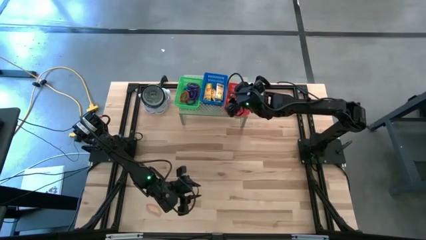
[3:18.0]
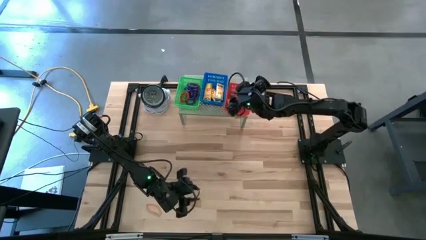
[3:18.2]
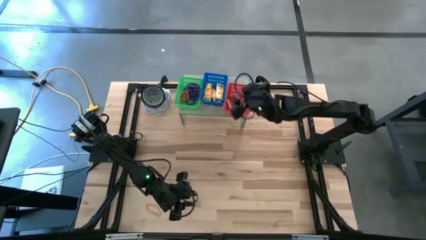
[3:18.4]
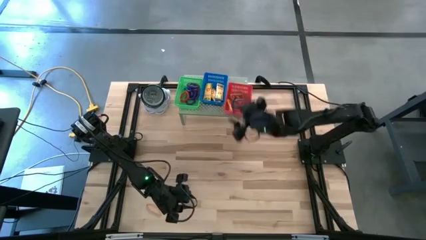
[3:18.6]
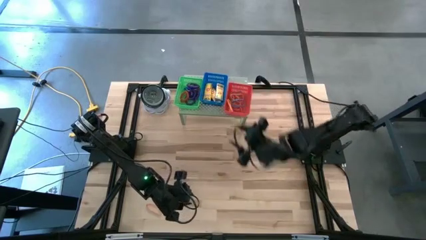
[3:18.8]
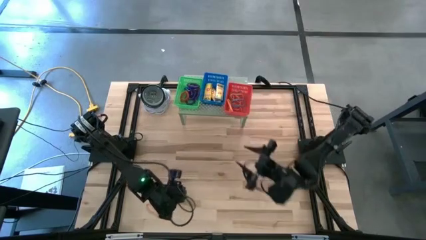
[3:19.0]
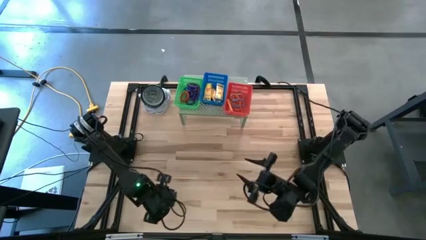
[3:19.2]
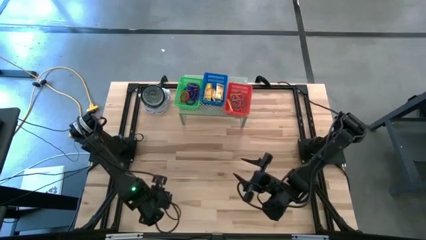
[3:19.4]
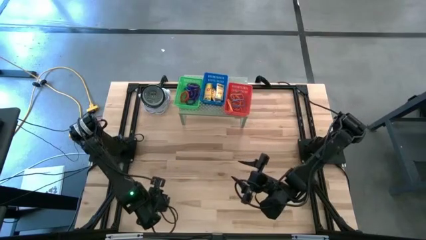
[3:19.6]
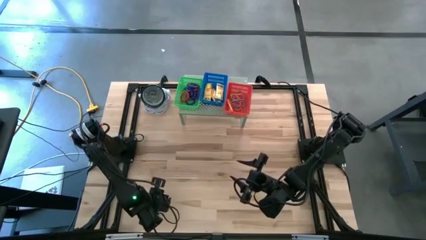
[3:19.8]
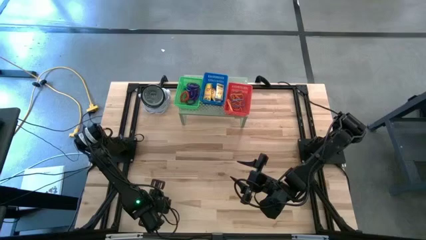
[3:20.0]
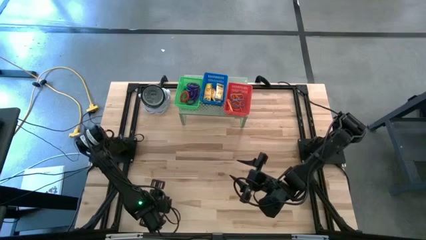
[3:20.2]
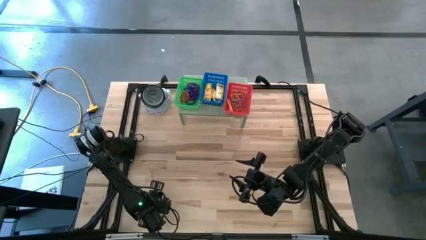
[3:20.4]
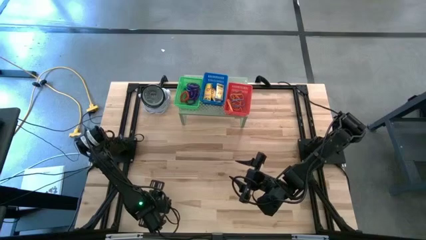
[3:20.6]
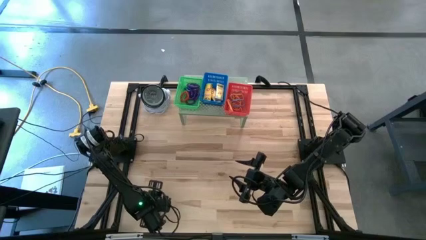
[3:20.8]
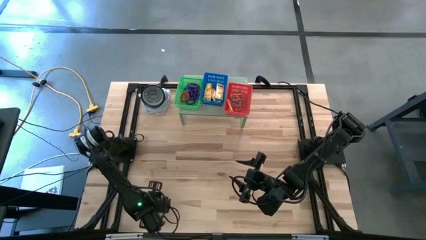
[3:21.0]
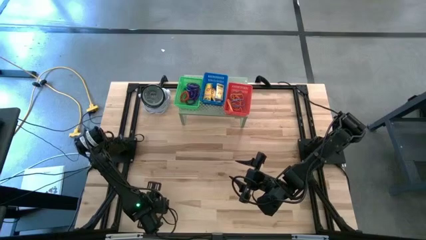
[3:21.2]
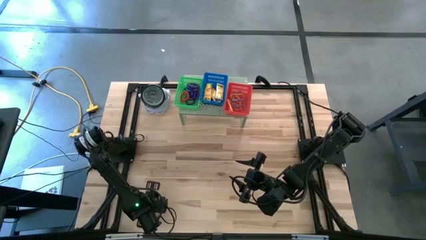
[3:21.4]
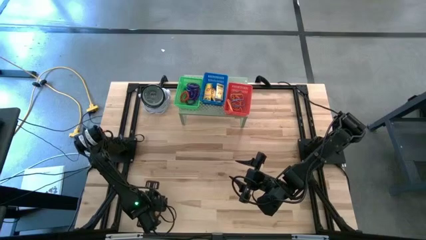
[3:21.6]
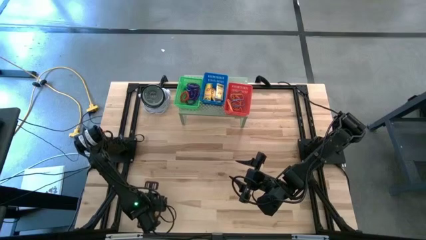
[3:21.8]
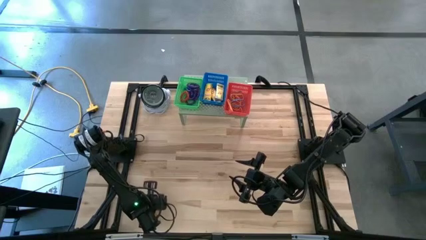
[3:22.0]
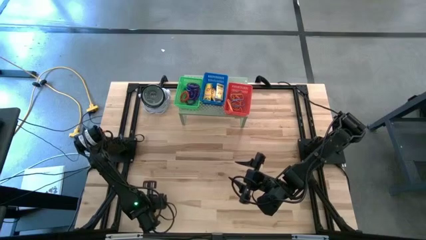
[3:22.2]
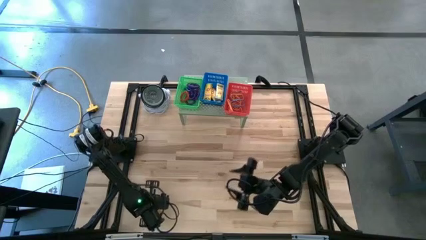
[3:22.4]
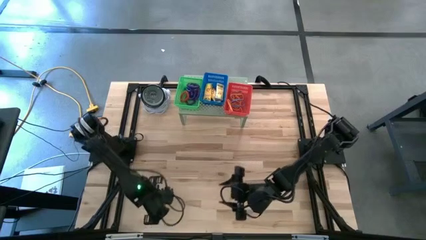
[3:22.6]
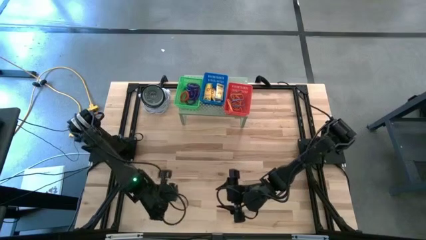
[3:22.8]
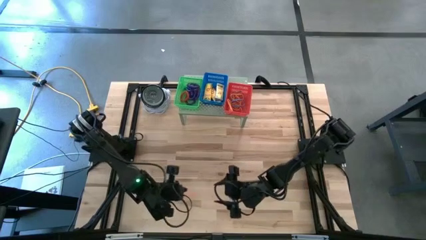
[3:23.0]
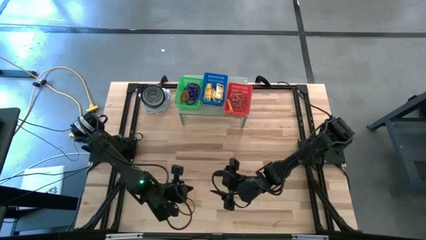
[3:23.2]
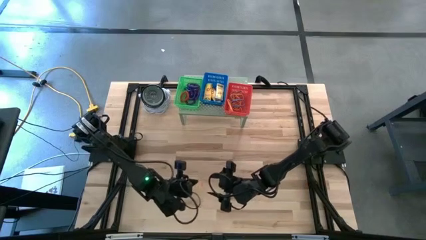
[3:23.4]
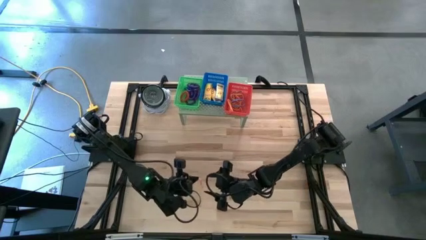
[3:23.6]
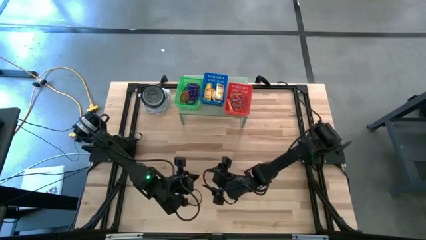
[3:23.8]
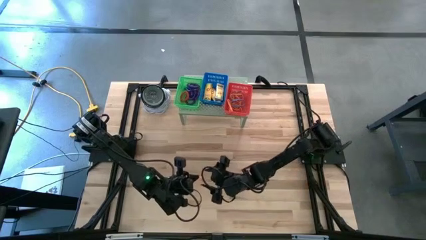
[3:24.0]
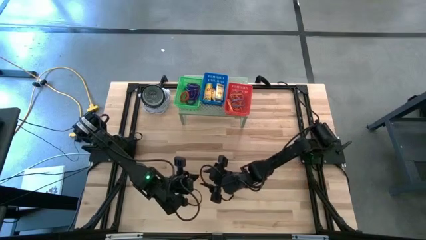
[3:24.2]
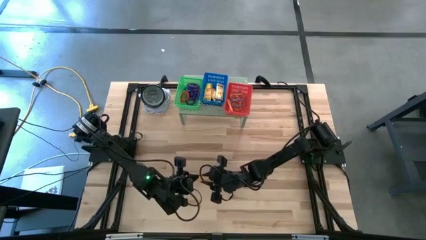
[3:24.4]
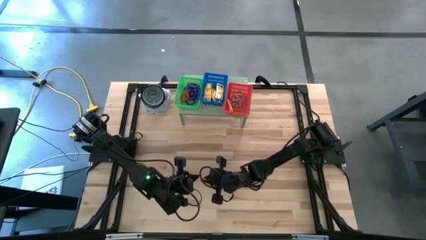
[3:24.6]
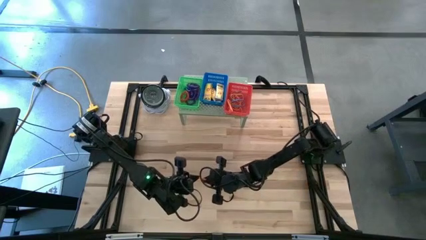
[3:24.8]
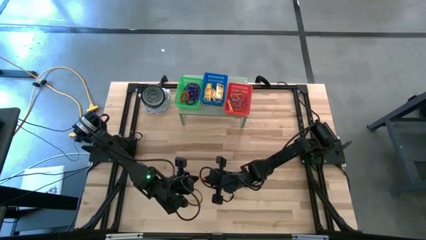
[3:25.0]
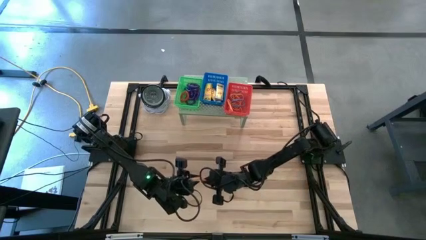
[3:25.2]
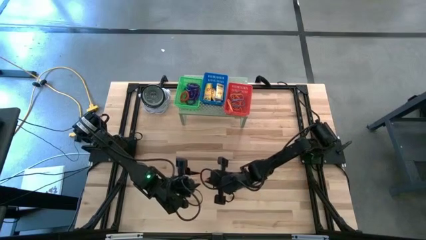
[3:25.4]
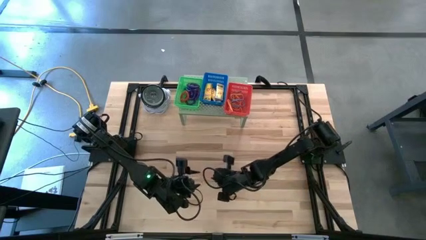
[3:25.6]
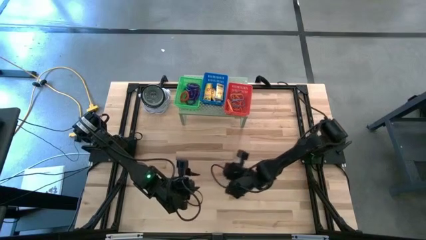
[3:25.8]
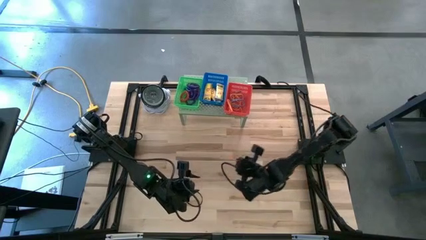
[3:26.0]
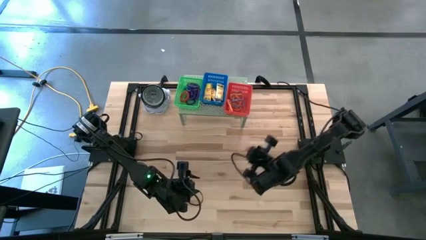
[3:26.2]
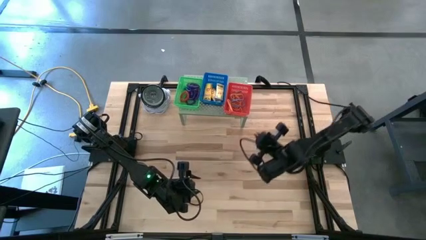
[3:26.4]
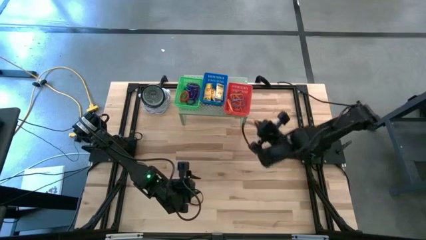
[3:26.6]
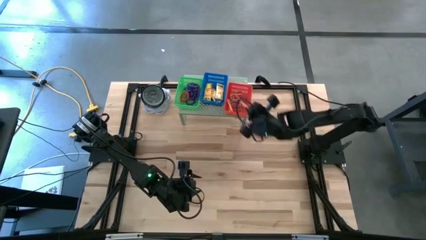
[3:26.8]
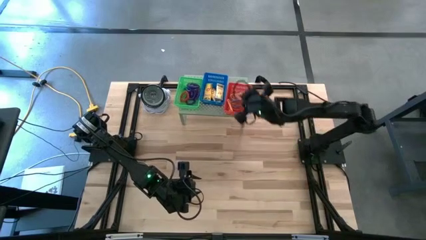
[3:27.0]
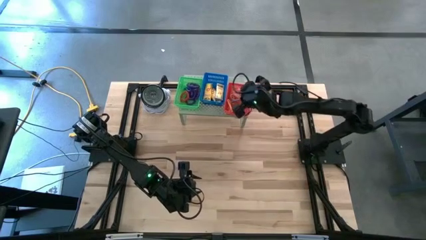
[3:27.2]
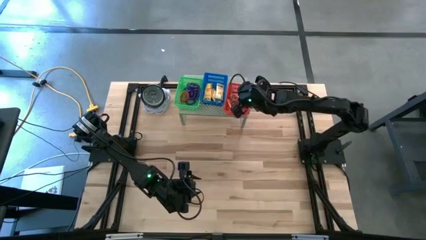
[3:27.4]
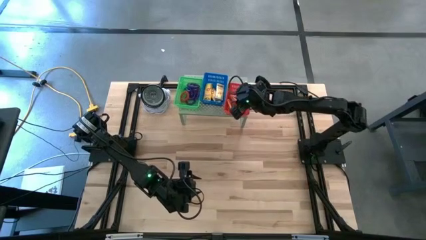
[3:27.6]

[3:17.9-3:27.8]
Task: Pick & Place Office Desk Supplies
Put the orange rubber band into the red bin on the shelf

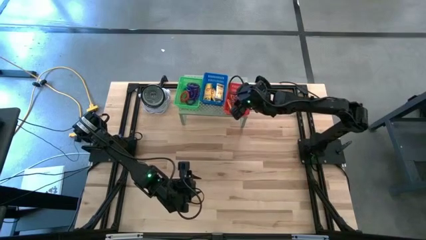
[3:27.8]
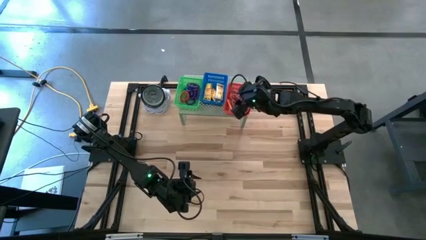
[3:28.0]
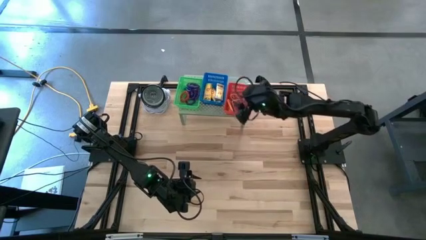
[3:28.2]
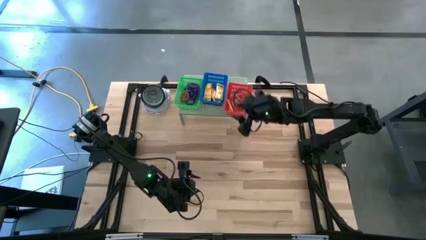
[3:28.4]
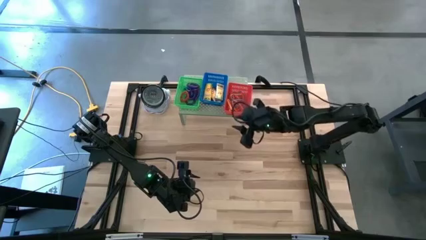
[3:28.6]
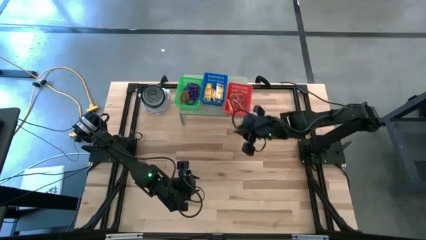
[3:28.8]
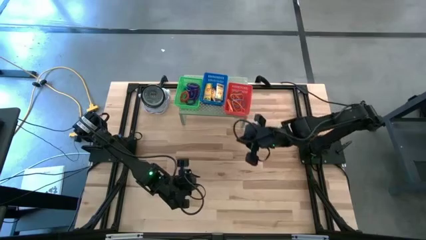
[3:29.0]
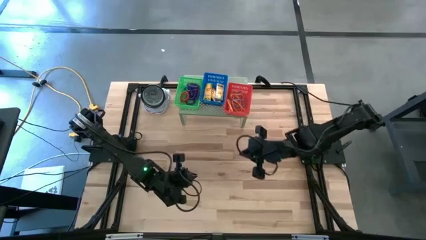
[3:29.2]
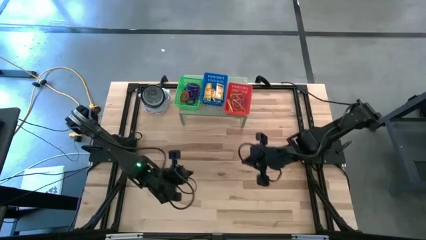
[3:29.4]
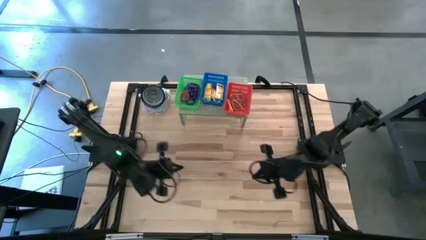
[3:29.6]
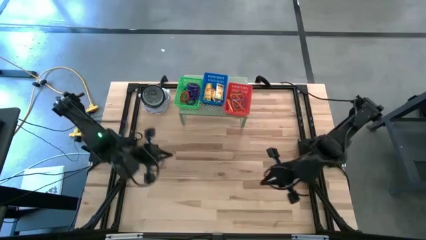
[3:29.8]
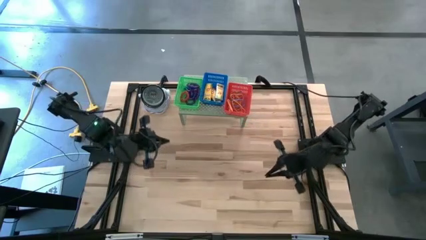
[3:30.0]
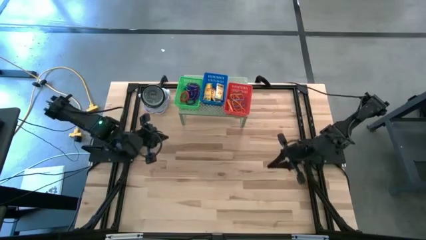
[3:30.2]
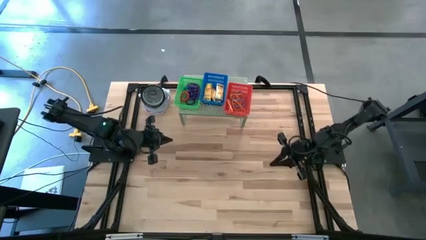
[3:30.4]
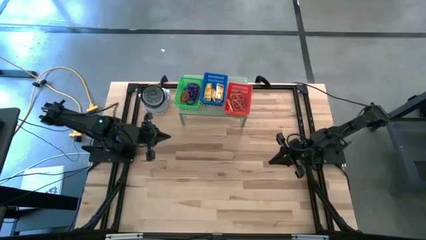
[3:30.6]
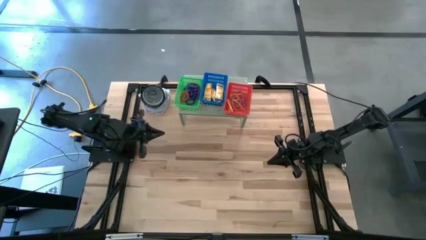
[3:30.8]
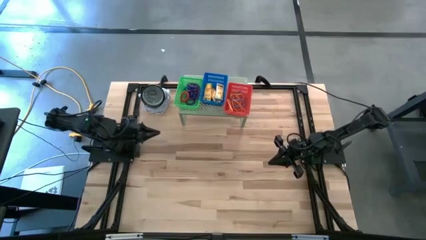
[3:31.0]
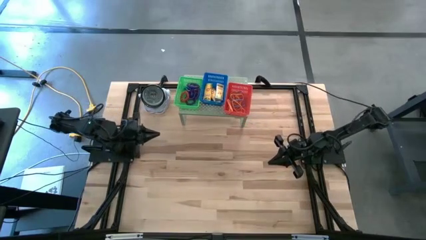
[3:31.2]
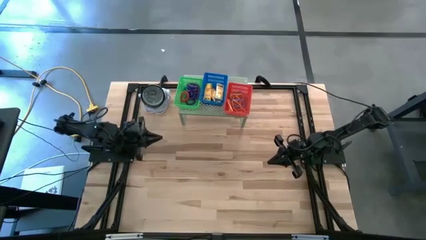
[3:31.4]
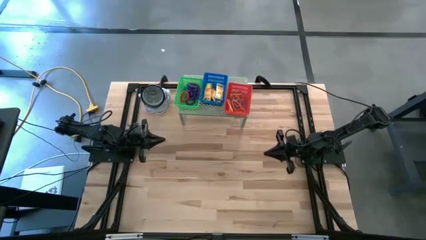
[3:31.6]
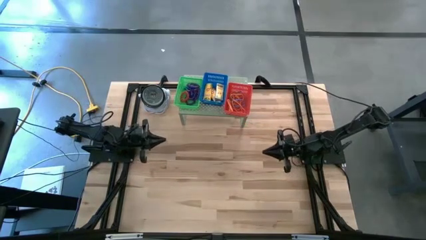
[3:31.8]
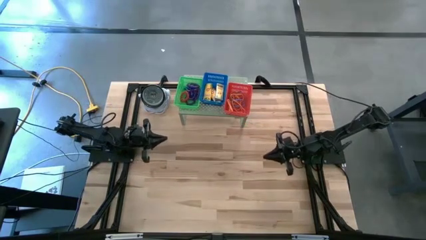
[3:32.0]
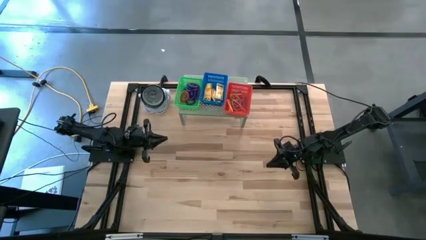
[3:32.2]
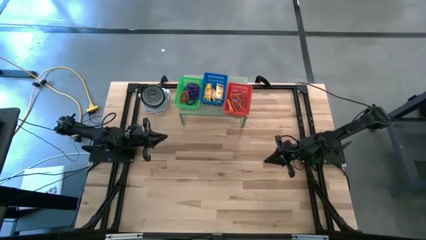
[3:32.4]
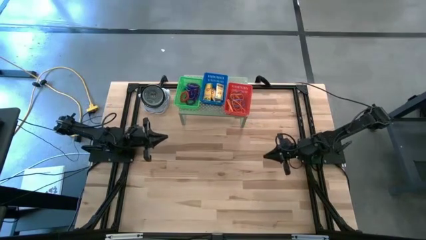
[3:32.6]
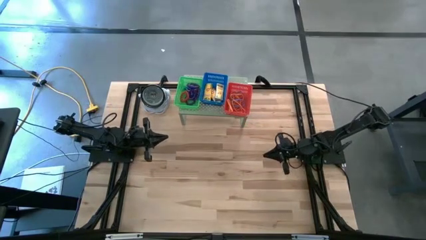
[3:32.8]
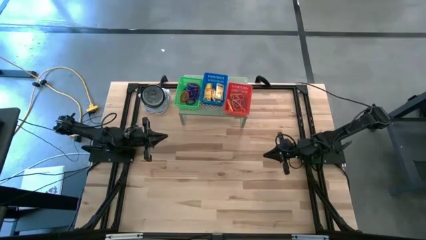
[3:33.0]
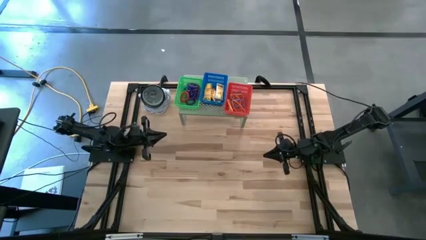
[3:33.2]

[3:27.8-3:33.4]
Return to Home Position

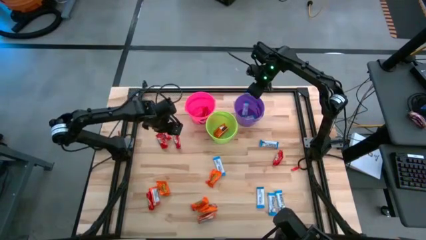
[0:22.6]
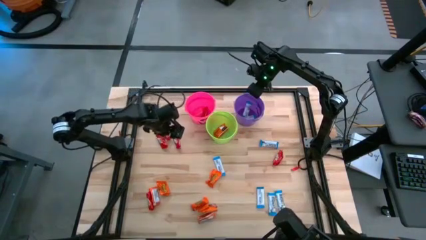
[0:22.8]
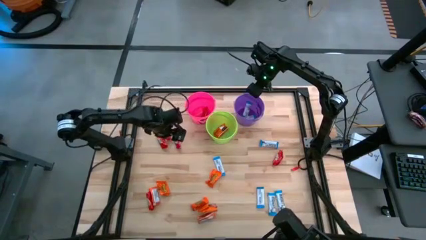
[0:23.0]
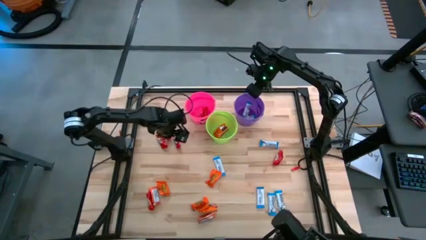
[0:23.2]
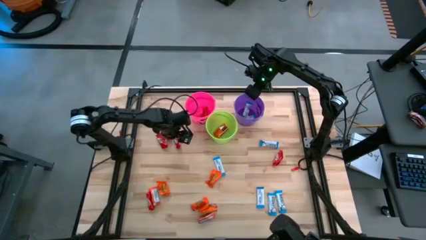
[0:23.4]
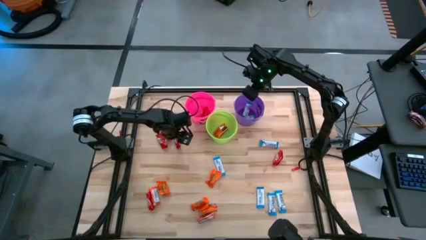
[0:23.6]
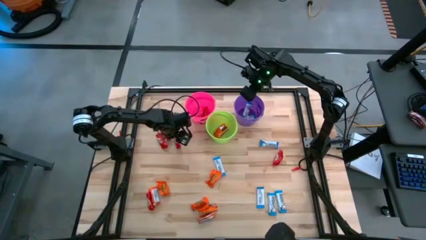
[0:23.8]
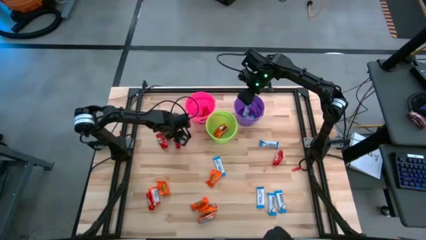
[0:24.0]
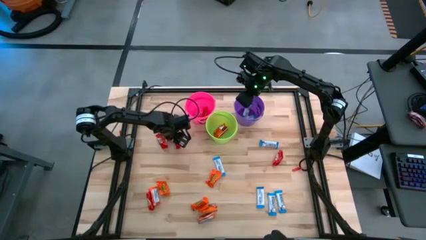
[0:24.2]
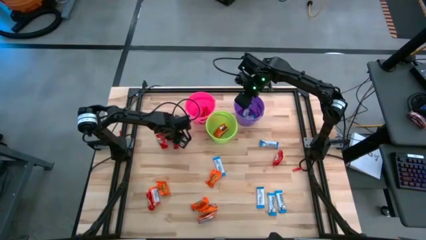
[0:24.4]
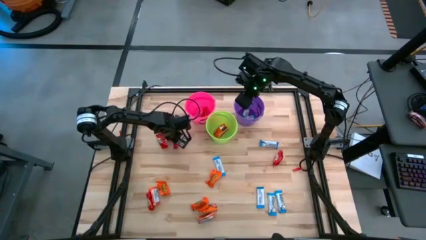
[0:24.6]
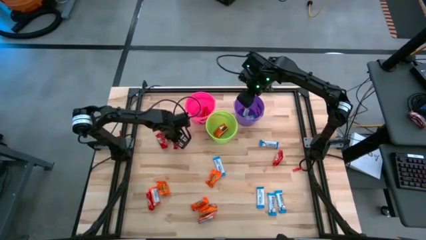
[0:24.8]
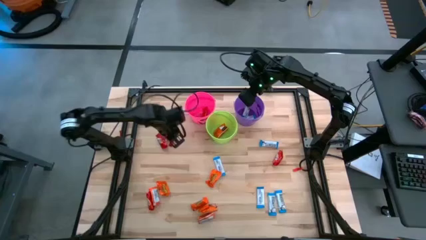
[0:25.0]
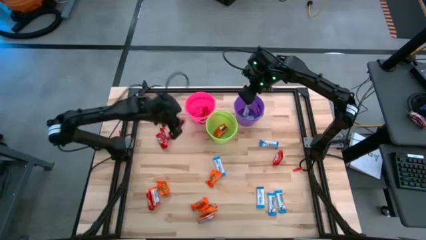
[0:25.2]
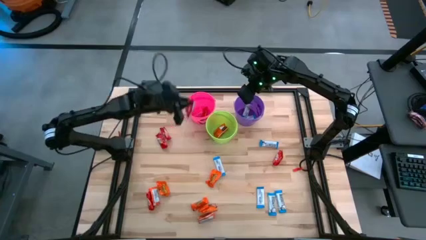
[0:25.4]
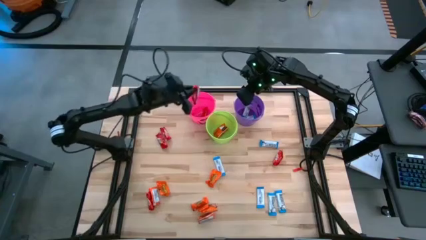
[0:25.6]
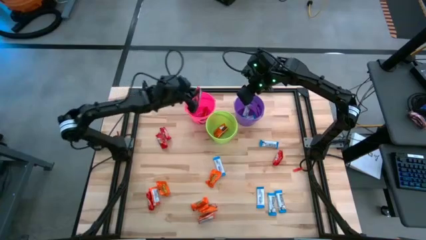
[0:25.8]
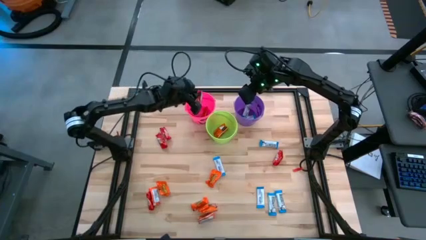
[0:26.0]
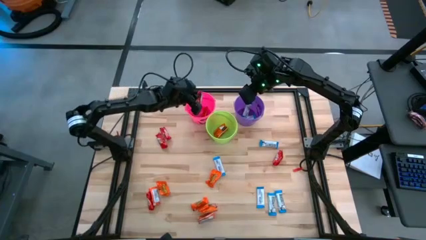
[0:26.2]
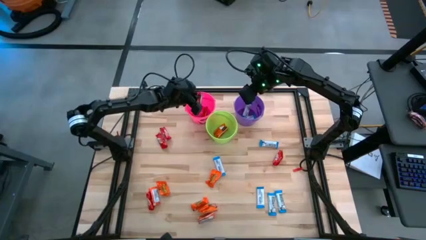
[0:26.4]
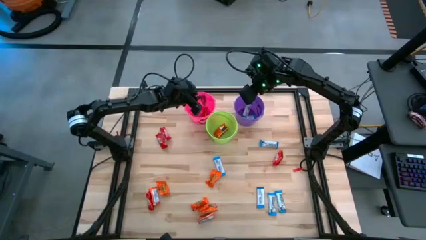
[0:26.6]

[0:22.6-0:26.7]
Task: Sort candy
Put the red candy into the pink bin
